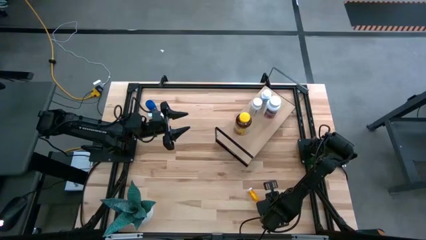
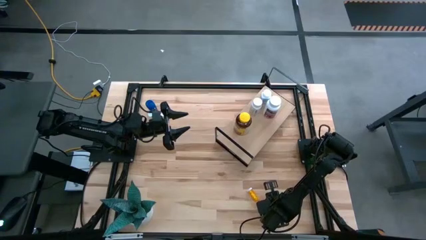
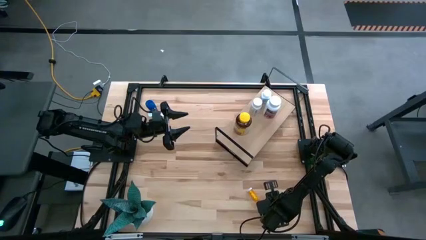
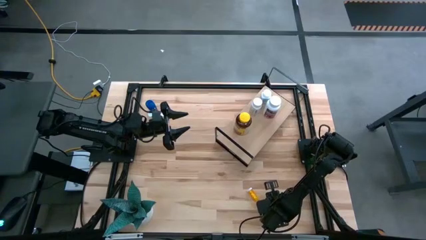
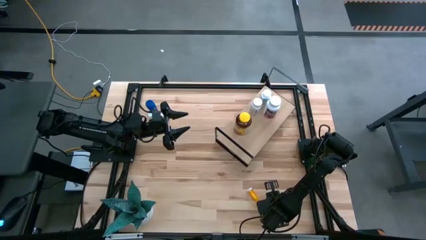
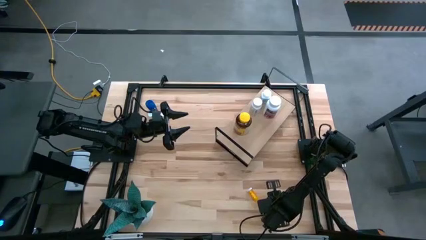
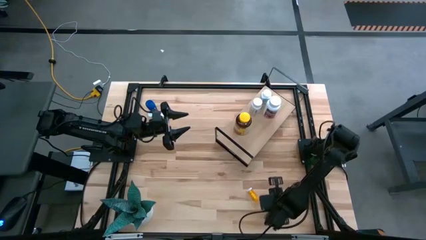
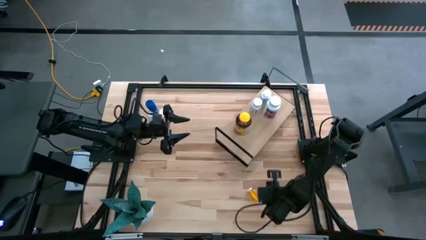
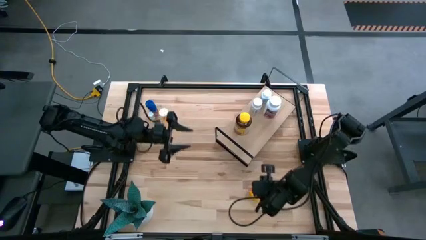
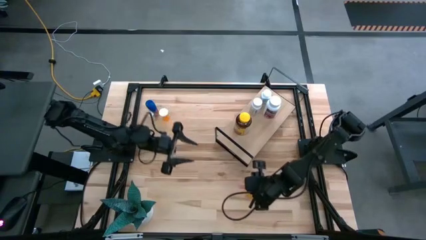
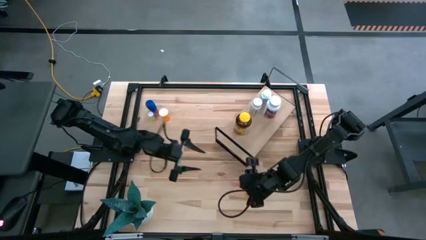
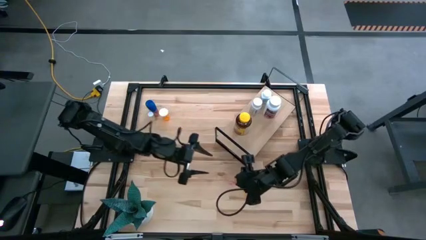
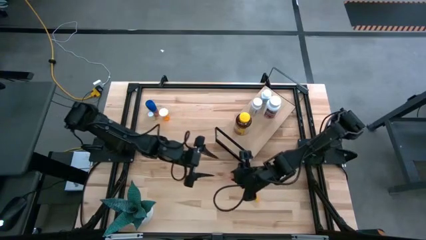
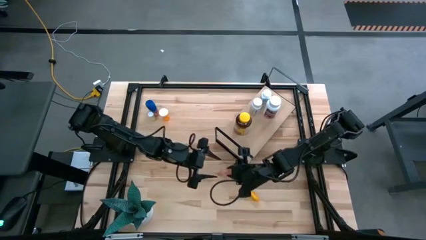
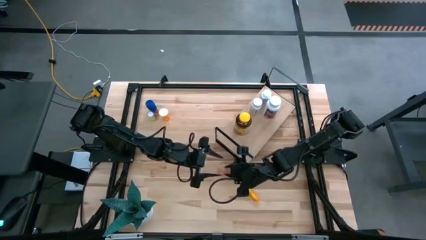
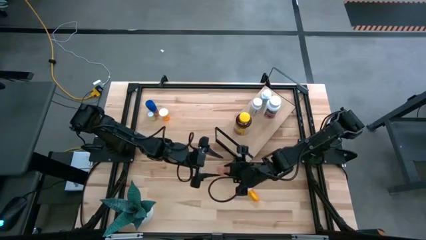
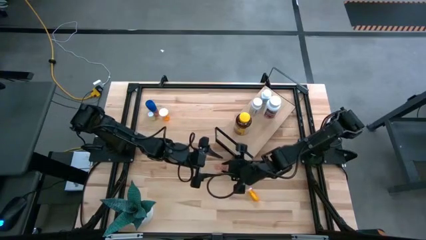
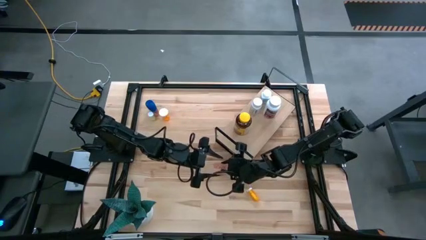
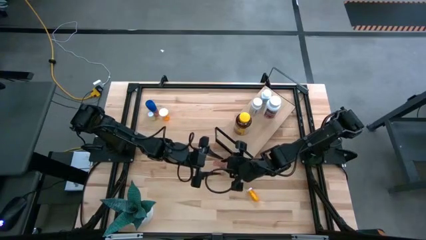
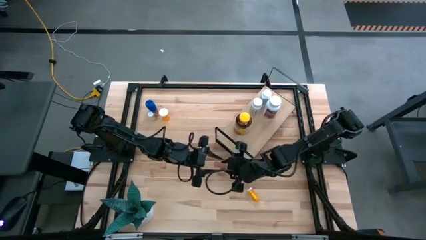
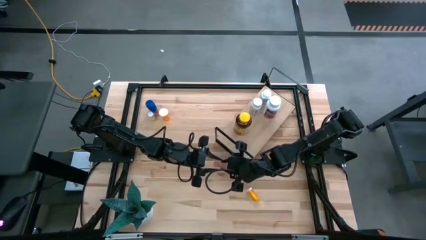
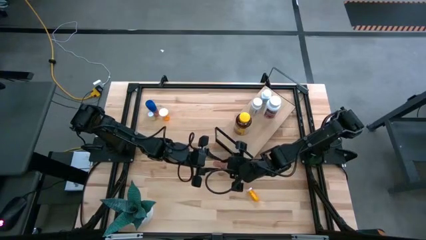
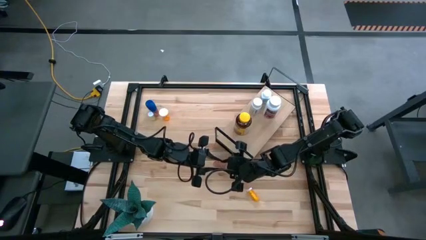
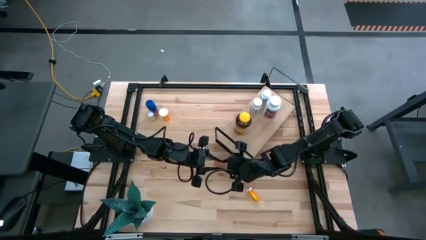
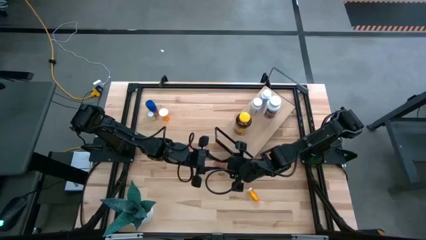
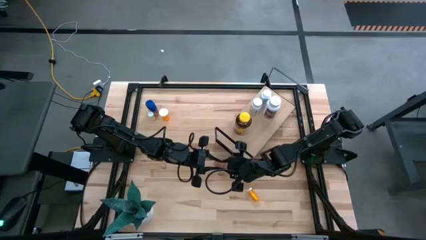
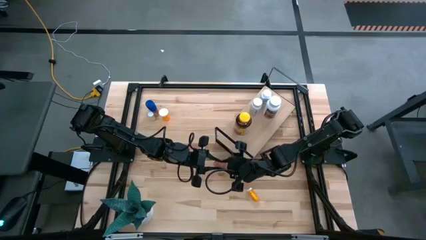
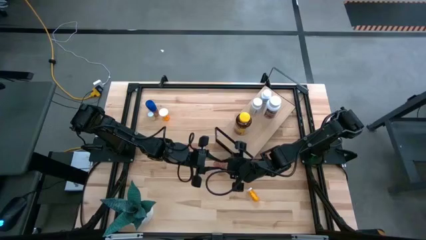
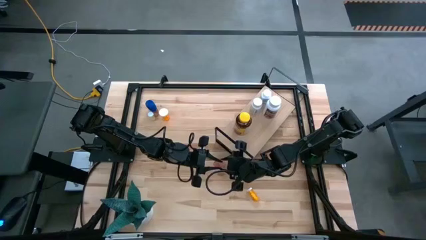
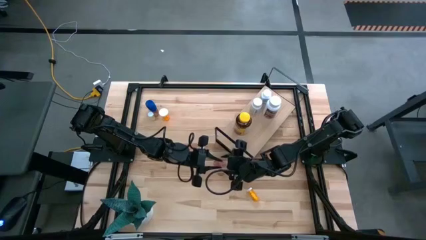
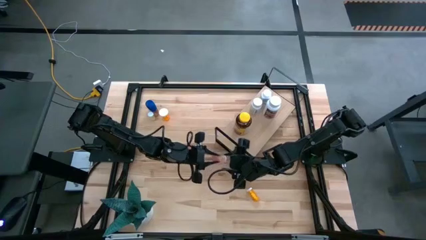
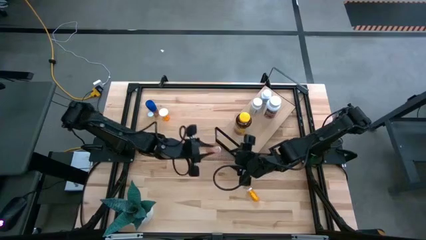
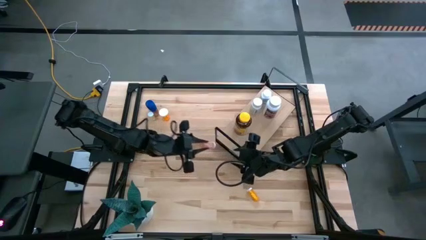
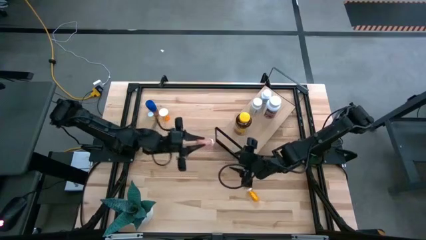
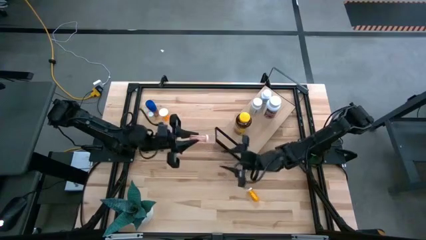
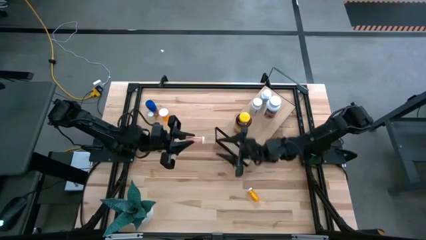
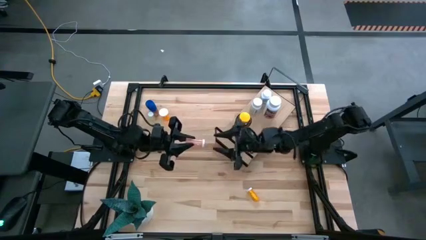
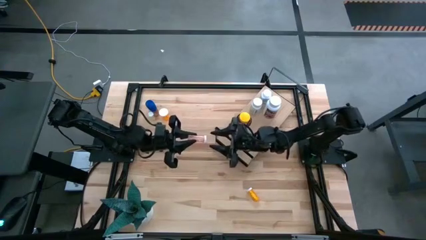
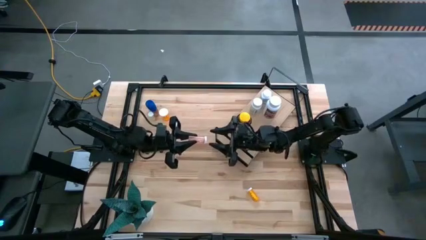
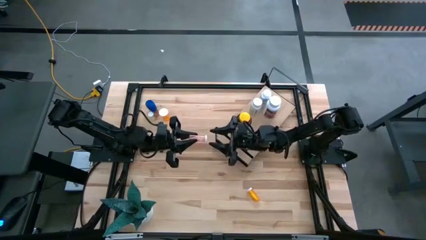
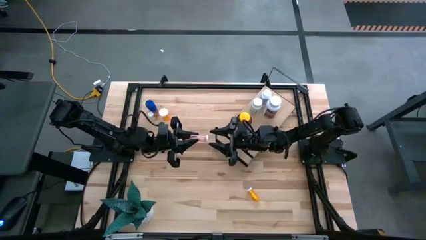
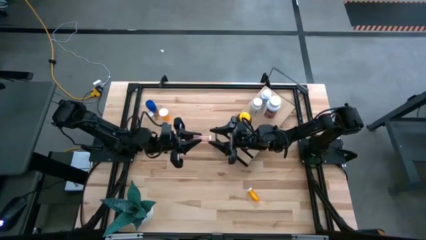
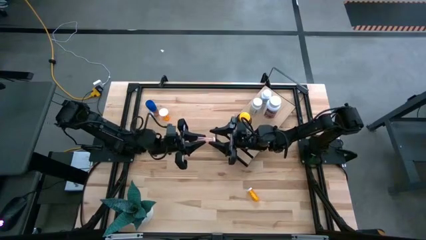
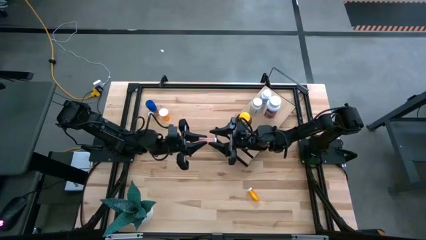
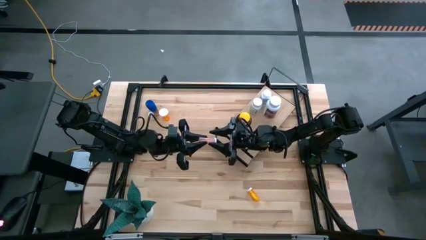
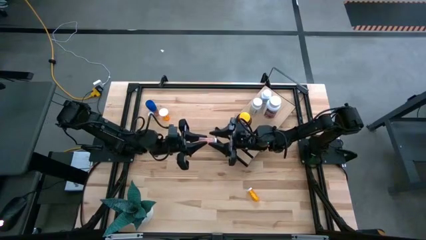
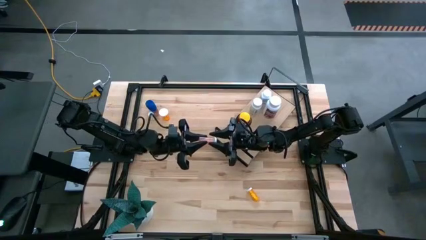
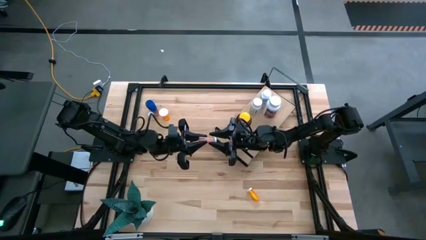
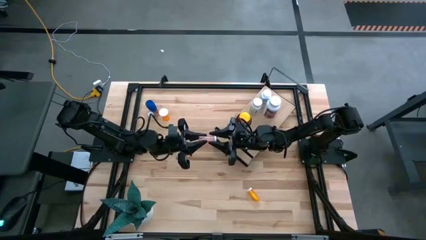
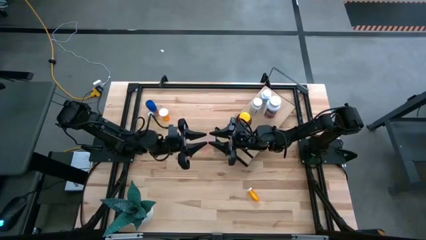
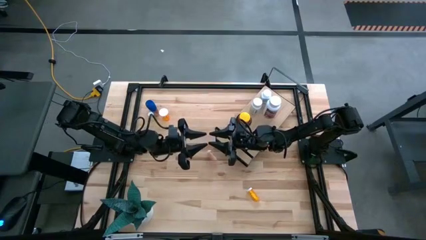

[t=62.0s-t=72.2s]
Task: Pick and place medicine bottles onto shelf by color
Put the red pill bottle on the shelf

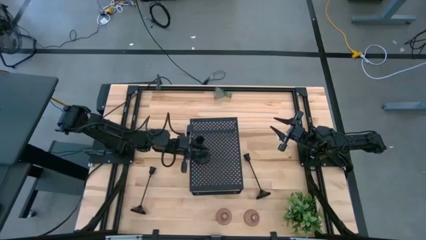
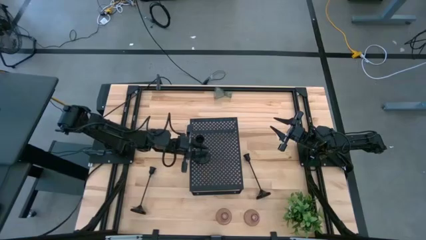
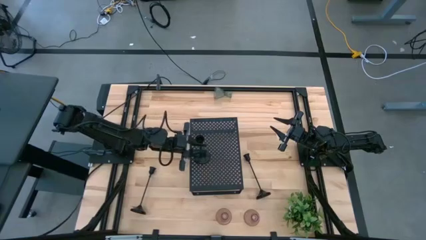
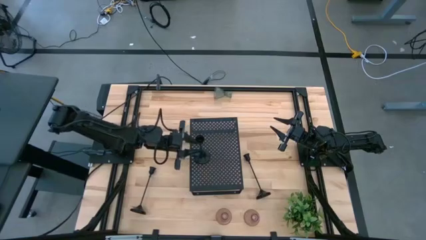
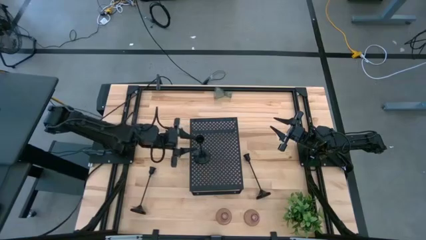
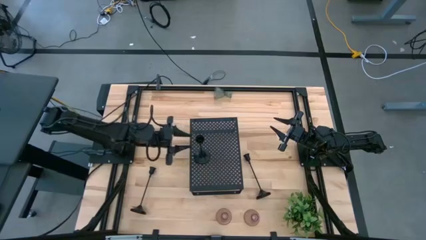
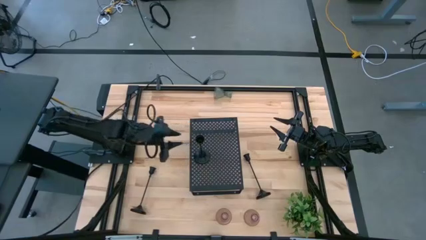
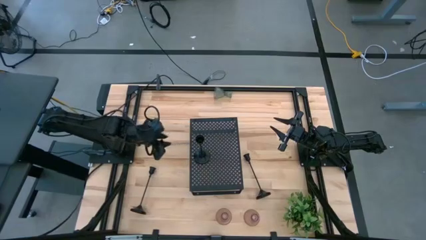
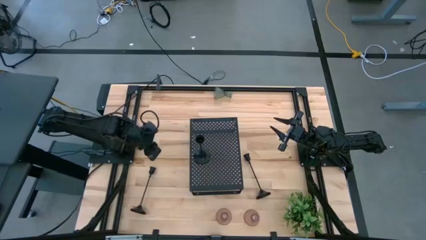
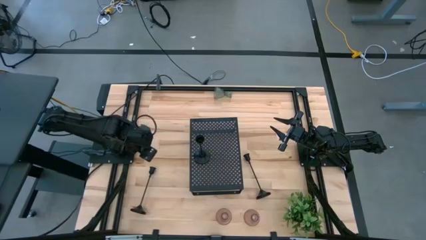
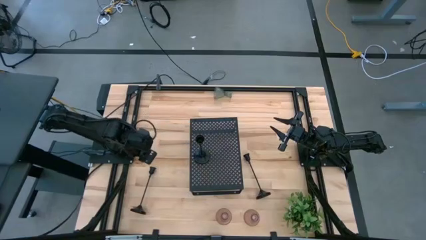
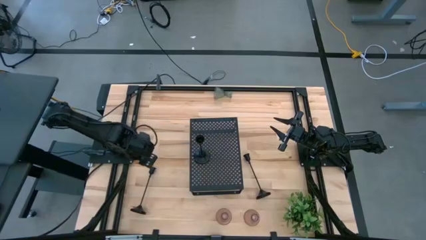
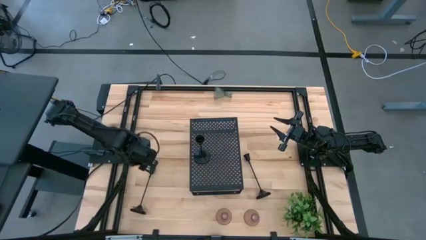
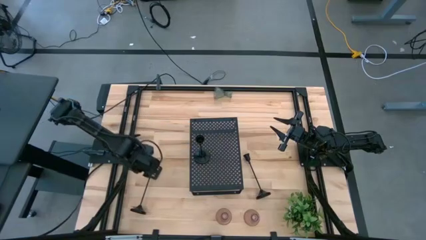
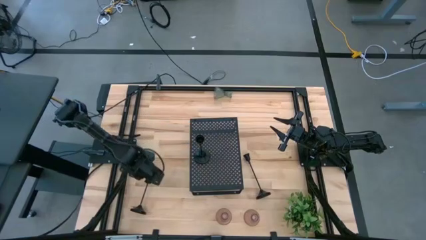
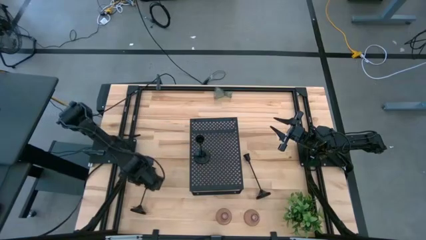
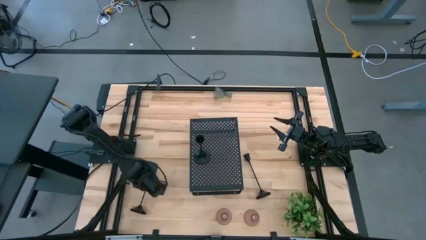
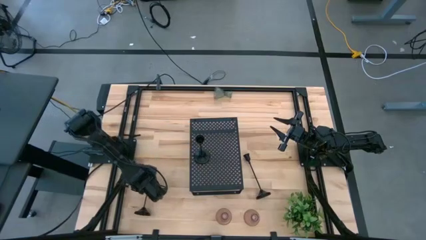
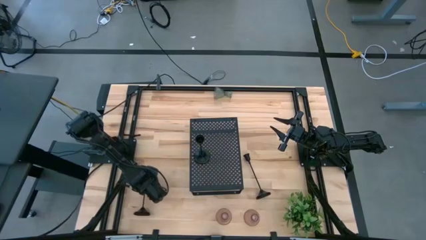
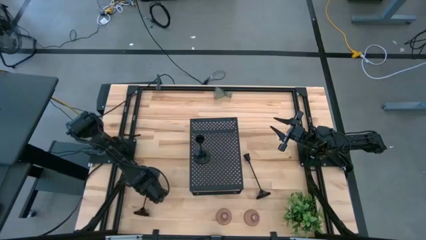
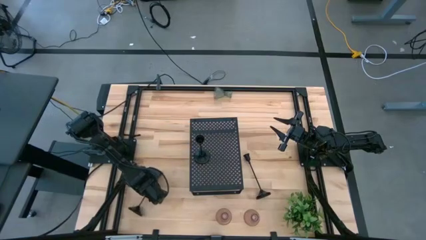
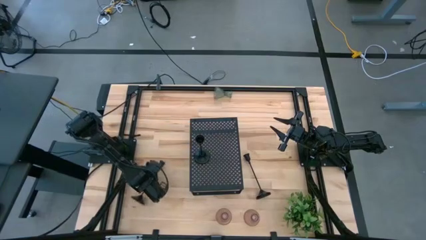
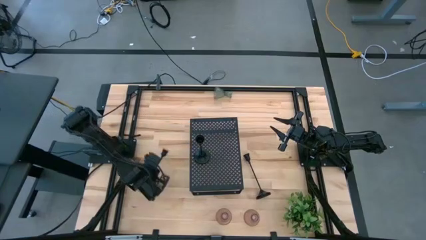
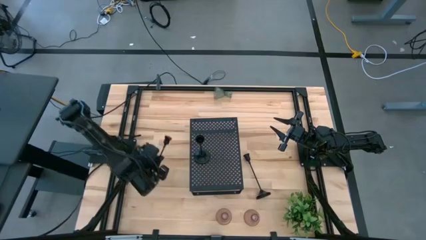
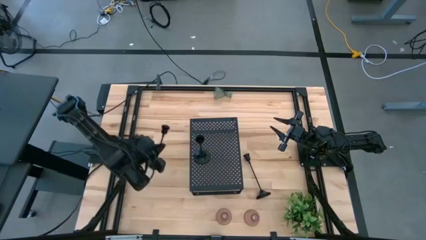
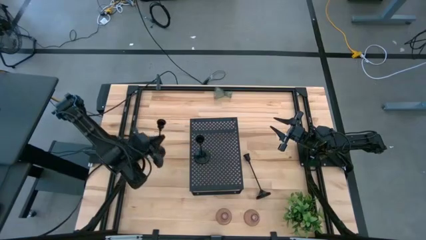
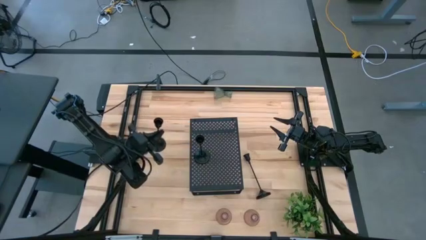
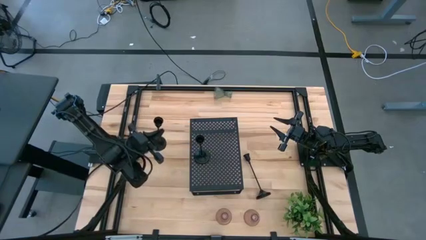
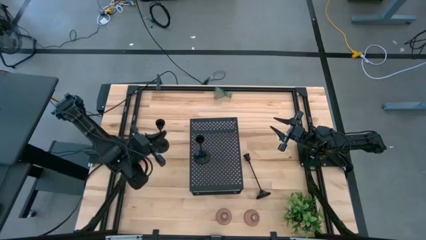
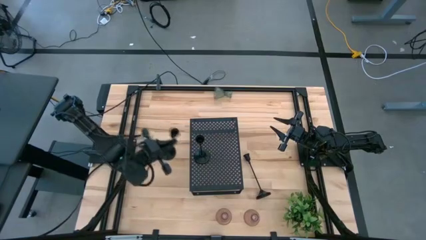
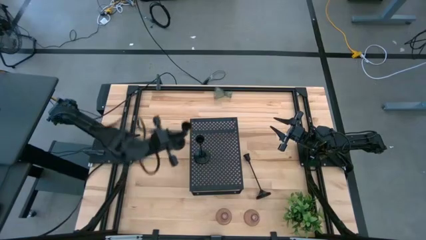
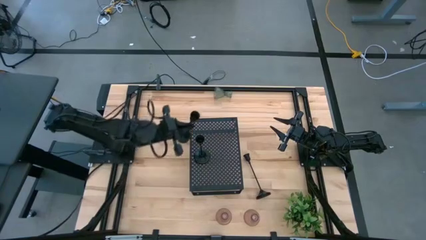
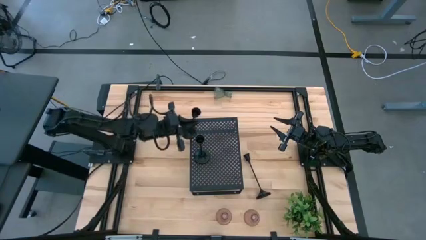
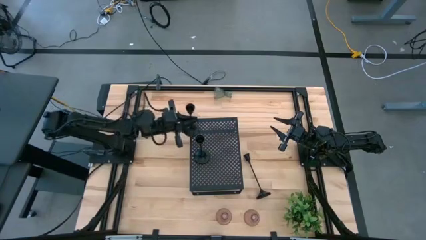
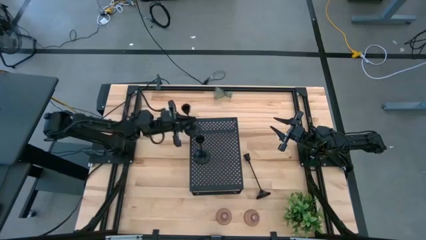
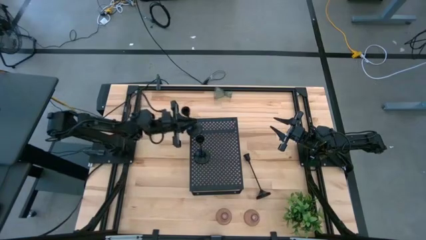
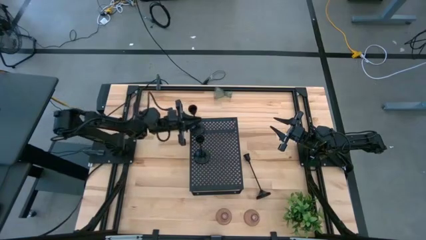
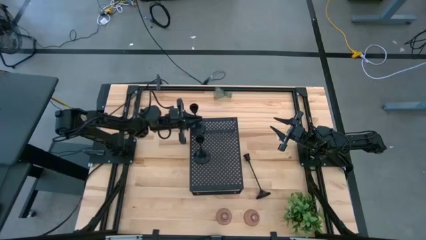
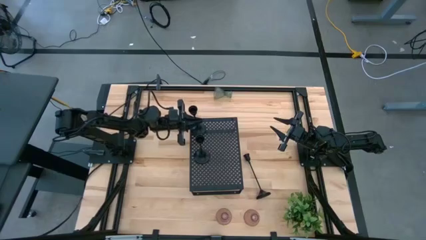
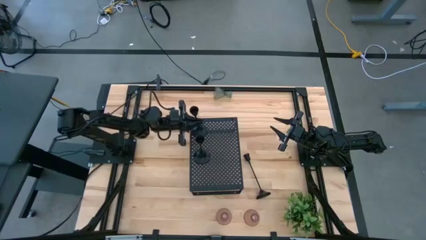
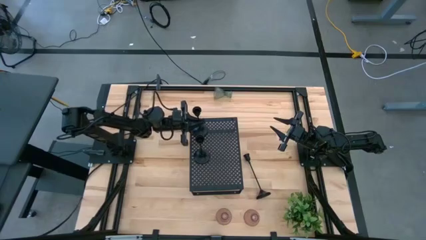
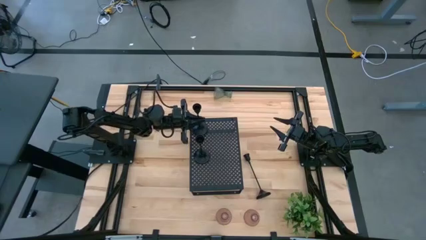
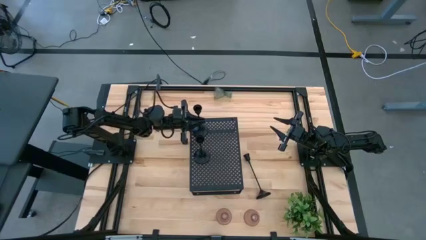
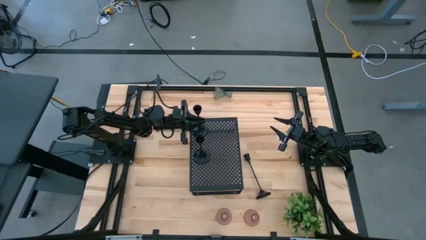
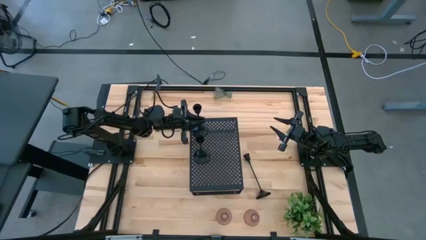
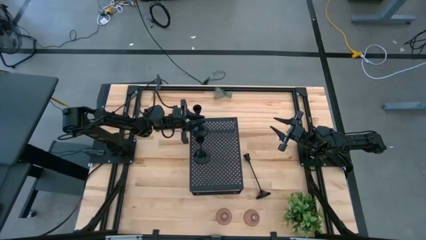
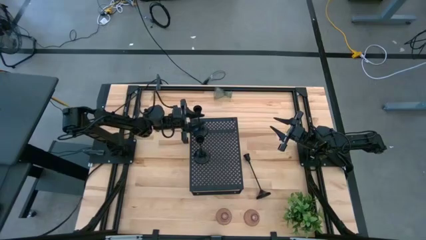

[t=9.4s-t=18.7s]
Task: Pick & Place candle stick holders
Put the left black candle holder on the shelf
